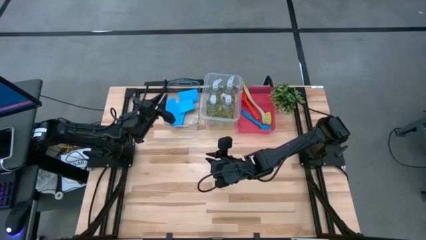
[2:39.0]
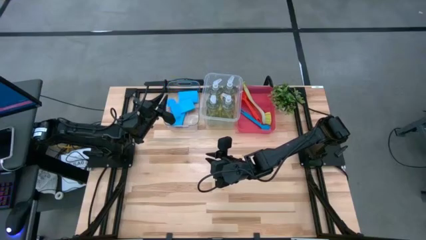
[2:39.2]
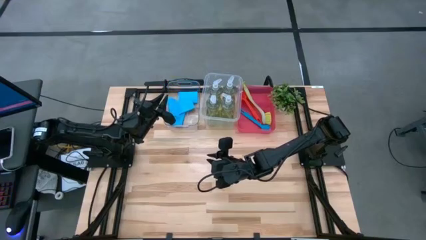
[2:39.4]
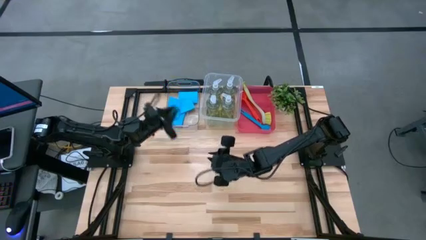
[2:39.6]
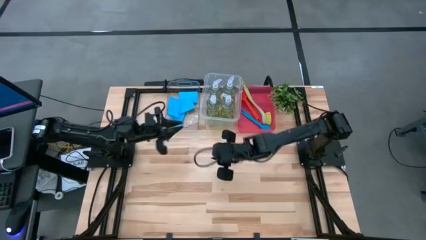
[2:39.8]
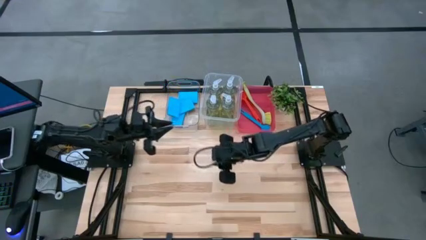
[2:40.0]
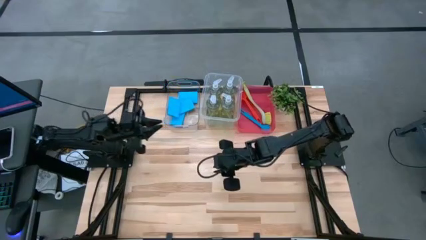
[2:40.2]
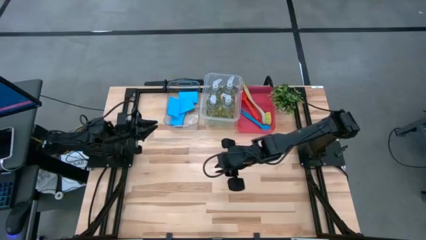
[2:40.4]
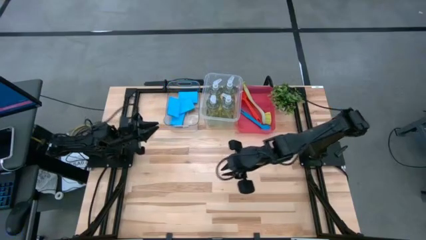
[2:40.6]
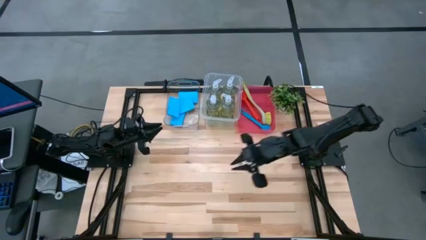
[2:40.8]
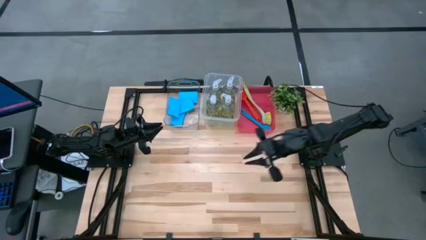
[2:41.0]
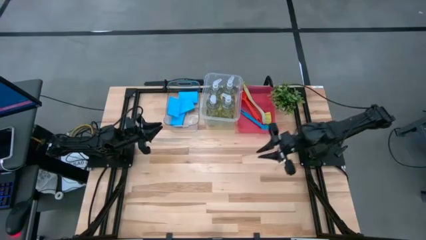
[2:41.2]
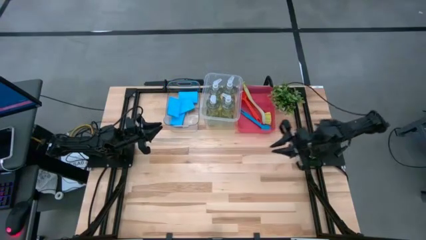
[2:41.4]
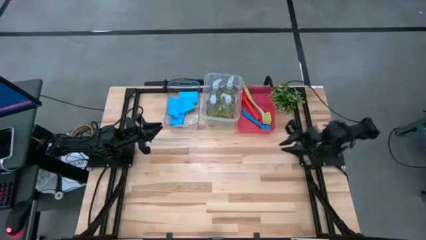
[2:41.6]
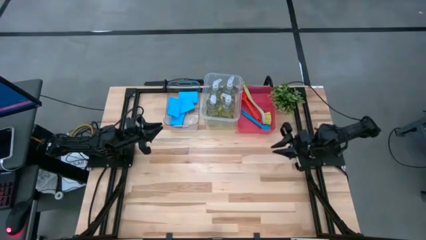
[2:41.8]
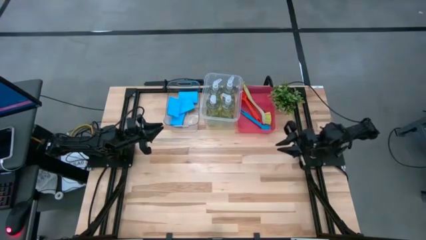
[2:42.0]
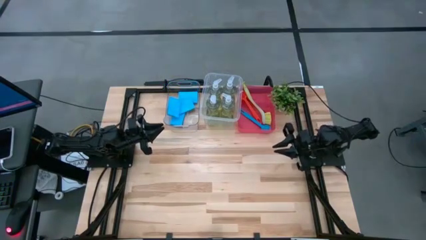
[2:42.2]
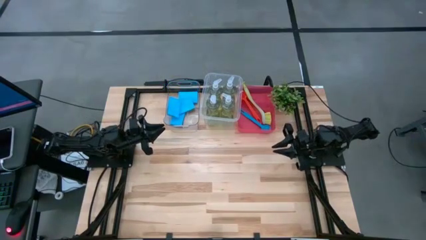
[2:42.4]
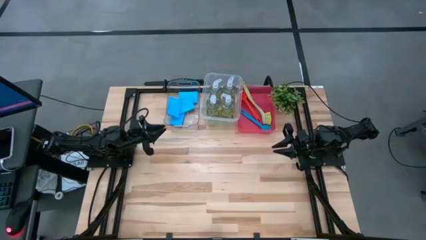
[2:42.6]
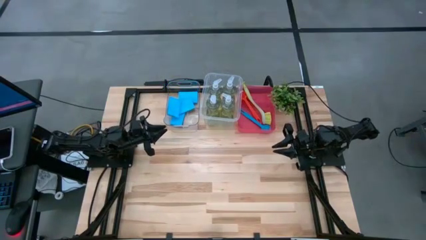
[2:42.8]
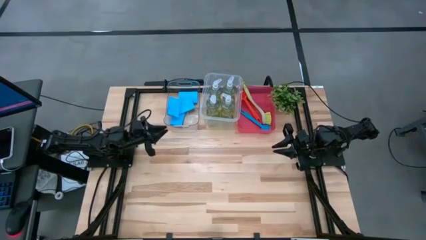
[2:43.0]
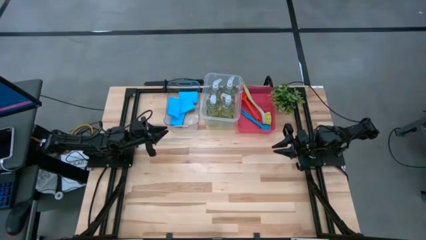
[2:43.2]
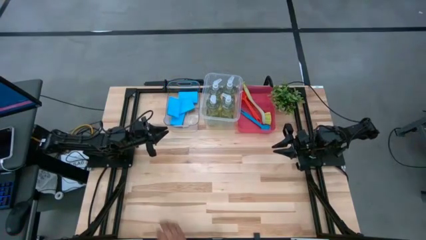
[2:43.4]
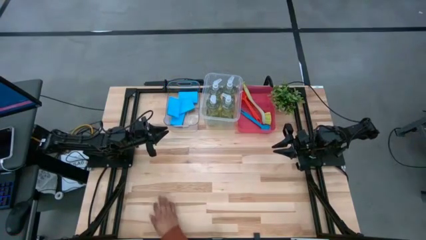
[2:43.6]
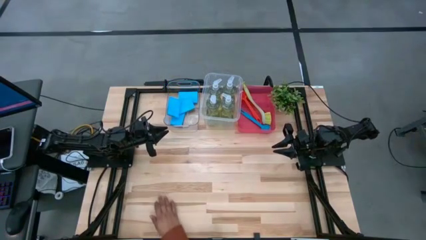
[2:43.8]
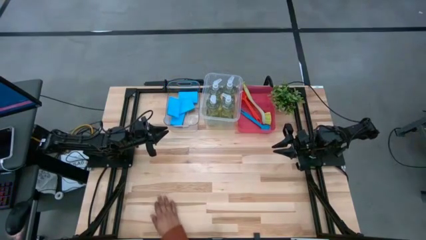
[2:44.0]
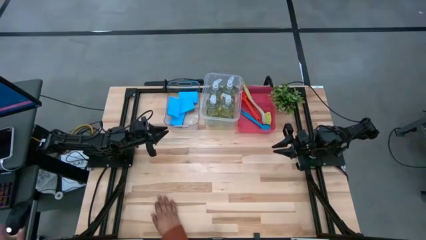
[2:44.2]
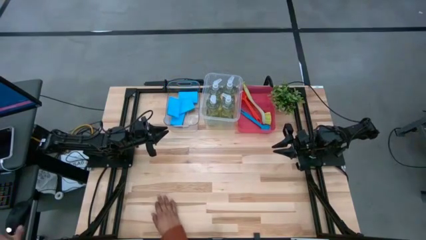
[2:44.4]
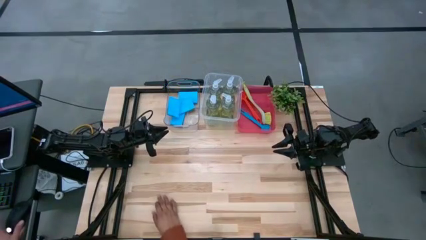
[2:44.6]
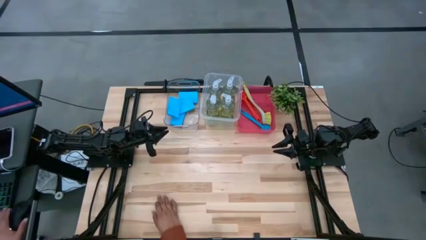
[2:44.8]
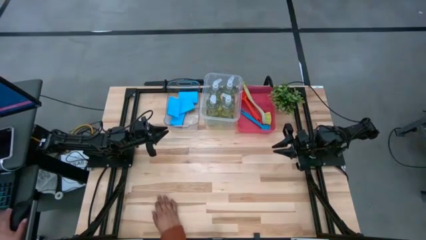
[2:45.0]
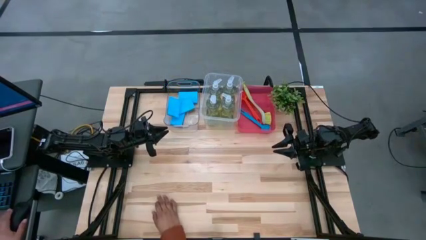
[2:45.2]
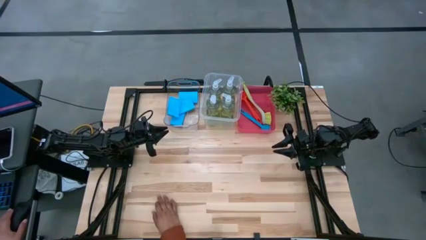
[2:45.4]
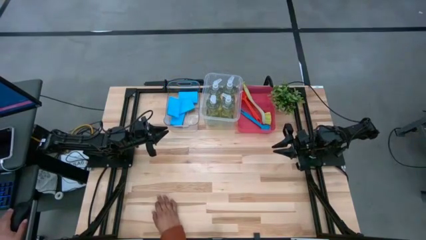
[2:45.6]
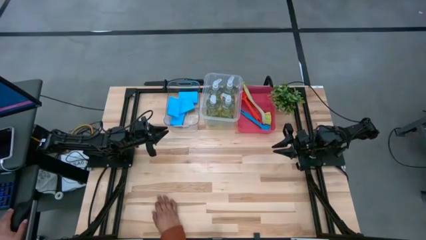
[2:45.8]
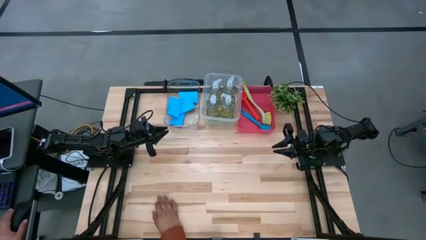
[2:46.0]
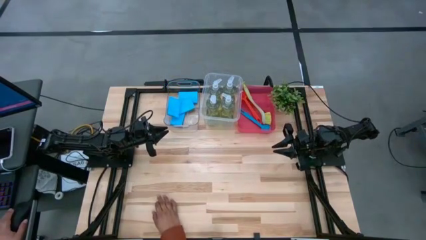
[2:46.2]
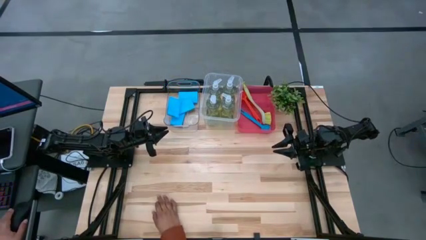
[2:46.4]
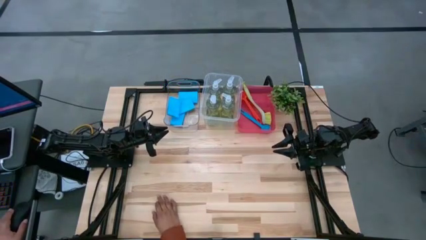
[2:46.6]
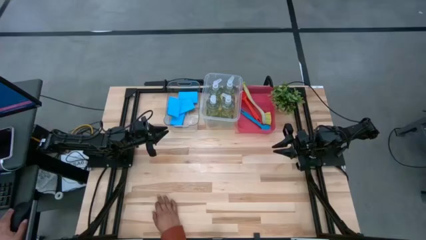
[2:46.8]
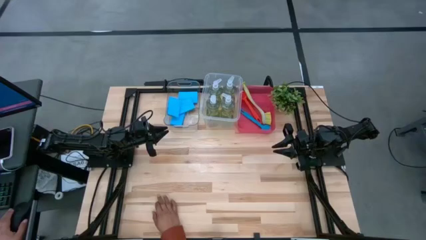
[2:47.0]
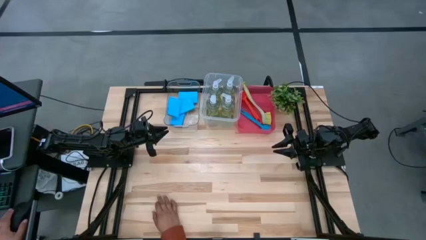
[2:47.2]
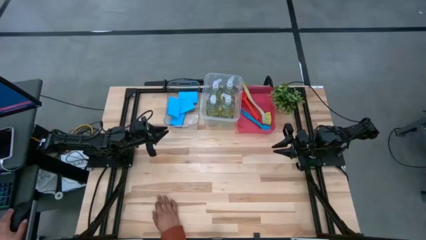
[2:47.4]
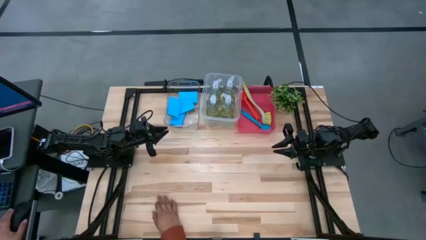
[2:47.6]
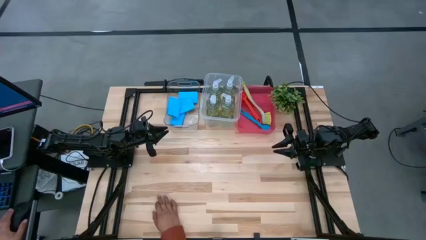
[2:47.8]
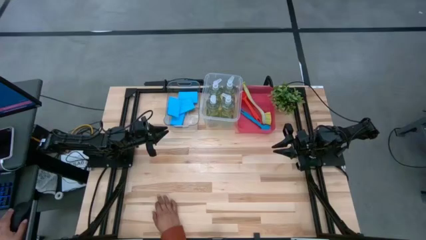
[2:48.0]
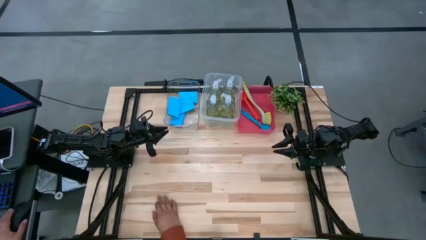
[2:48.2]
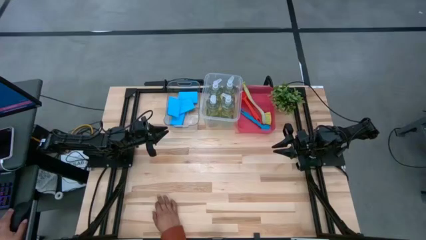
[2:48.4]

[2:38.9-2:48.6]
Task: Pick & Place Kitchen Sink Supplies
Return to Home Position

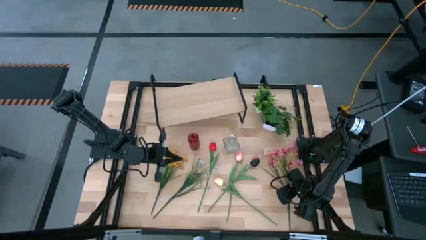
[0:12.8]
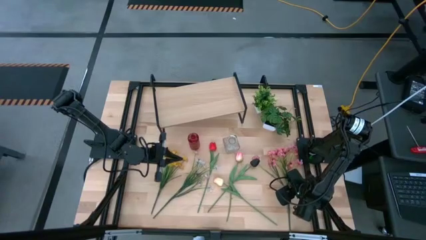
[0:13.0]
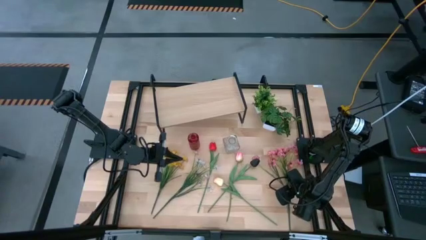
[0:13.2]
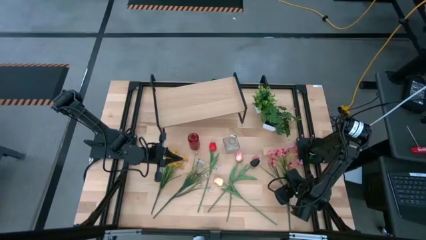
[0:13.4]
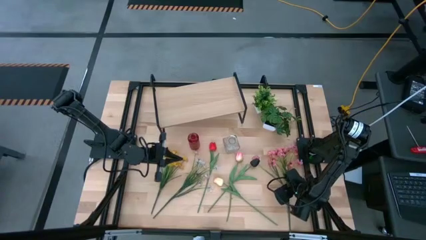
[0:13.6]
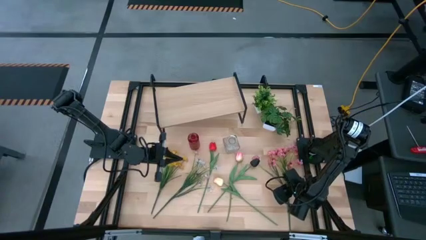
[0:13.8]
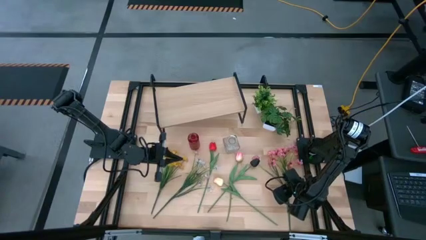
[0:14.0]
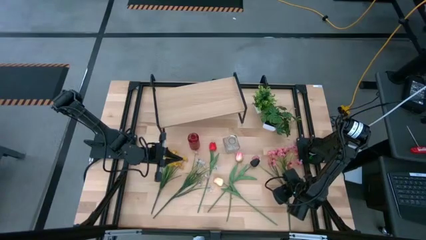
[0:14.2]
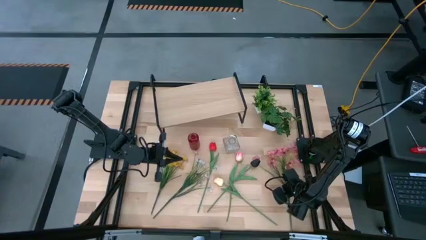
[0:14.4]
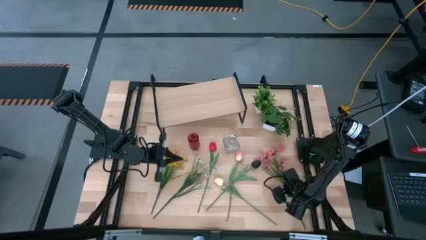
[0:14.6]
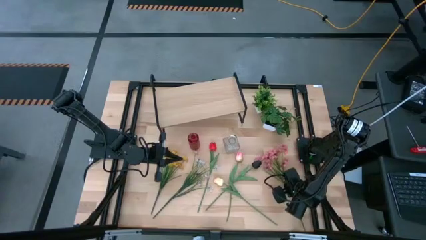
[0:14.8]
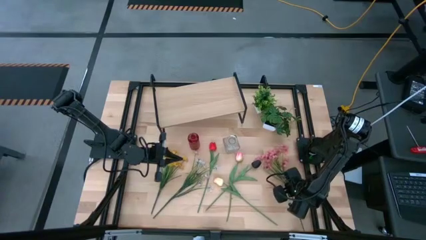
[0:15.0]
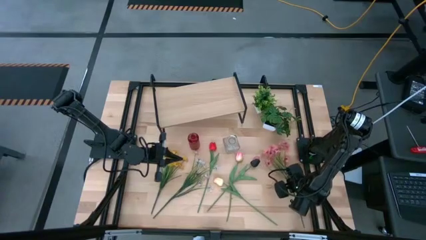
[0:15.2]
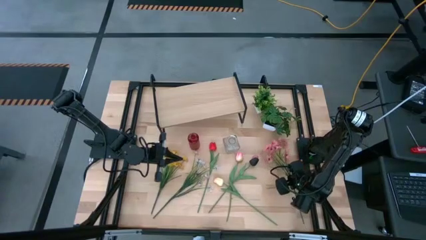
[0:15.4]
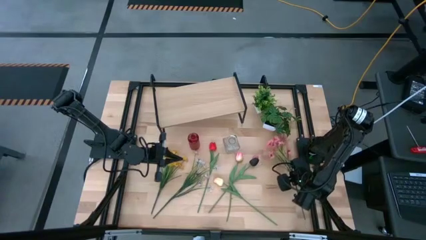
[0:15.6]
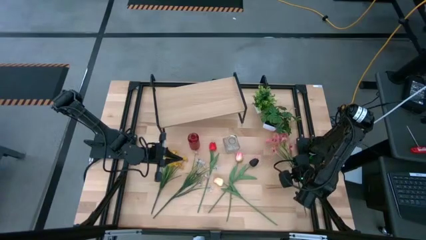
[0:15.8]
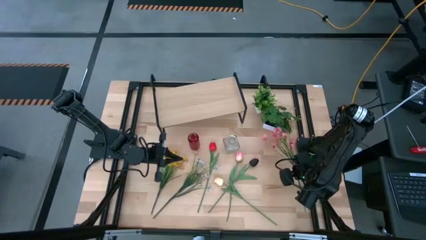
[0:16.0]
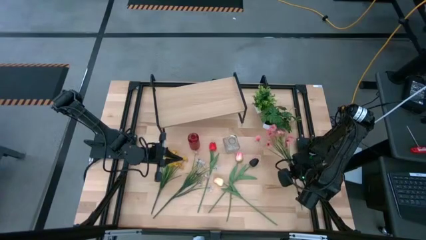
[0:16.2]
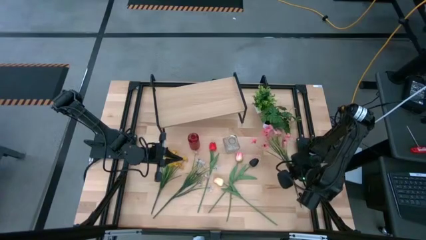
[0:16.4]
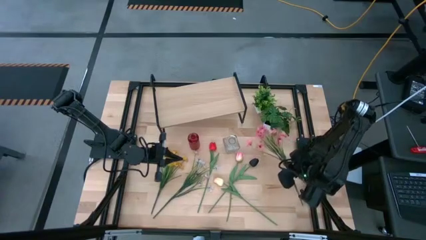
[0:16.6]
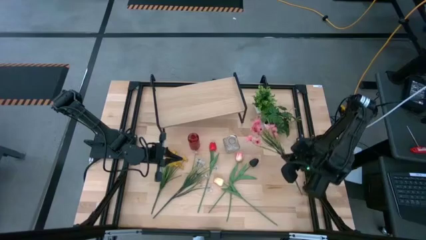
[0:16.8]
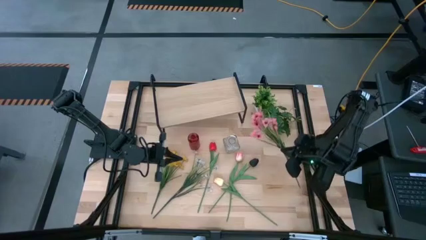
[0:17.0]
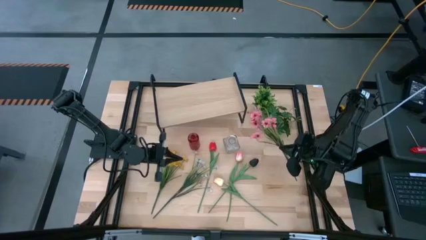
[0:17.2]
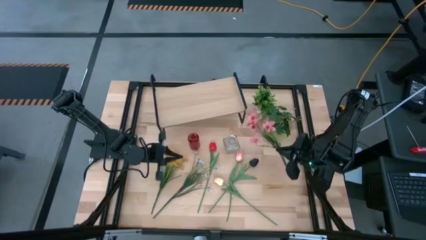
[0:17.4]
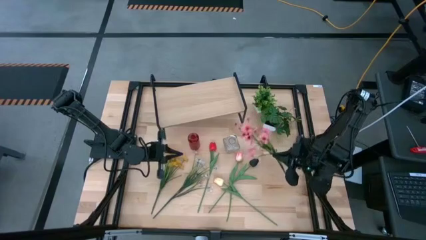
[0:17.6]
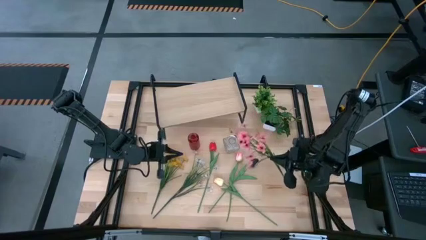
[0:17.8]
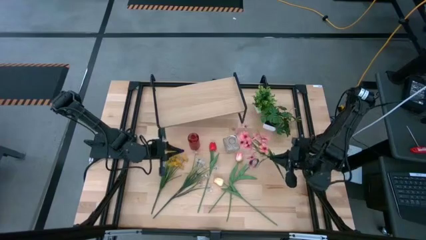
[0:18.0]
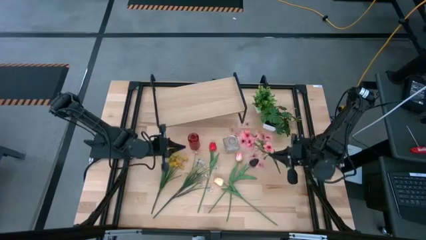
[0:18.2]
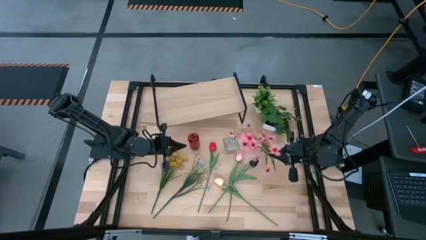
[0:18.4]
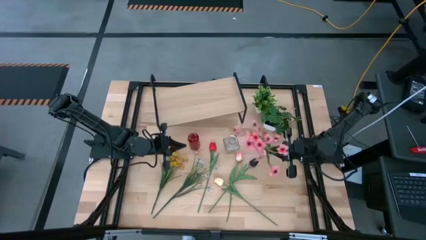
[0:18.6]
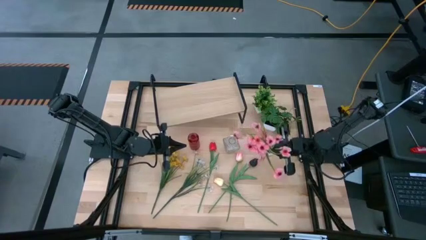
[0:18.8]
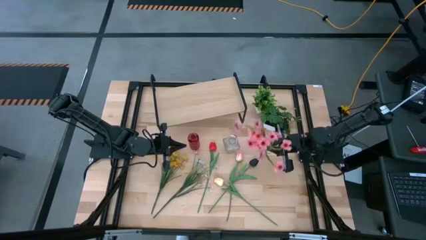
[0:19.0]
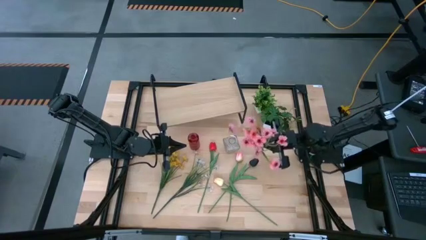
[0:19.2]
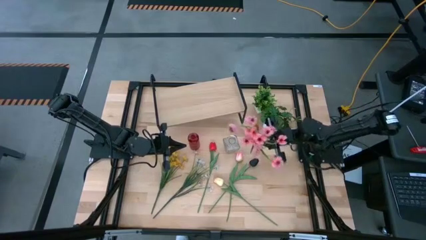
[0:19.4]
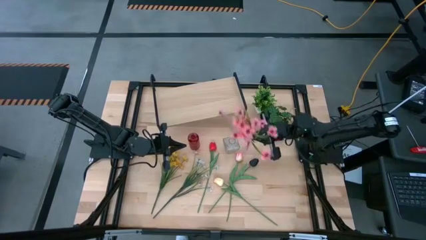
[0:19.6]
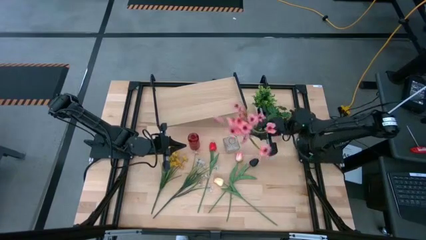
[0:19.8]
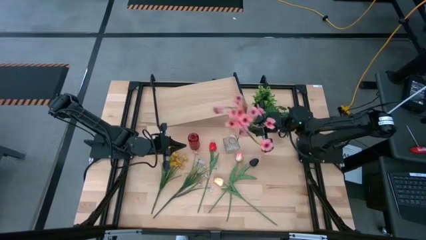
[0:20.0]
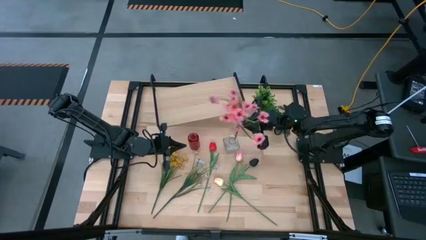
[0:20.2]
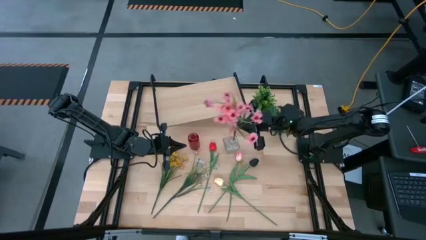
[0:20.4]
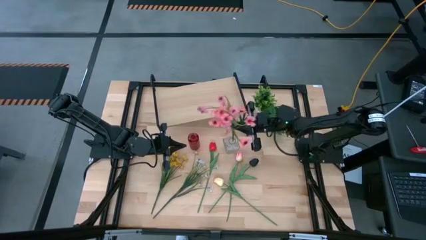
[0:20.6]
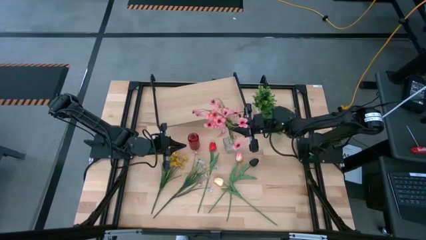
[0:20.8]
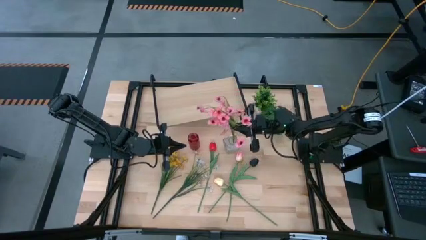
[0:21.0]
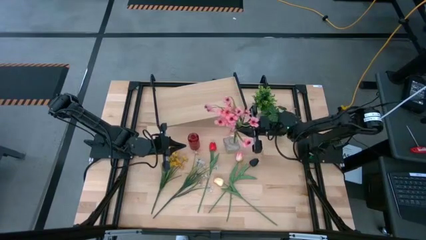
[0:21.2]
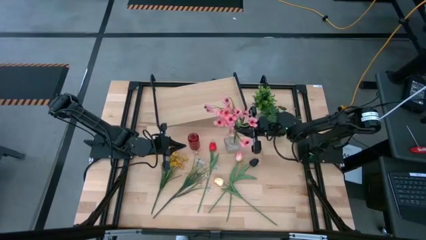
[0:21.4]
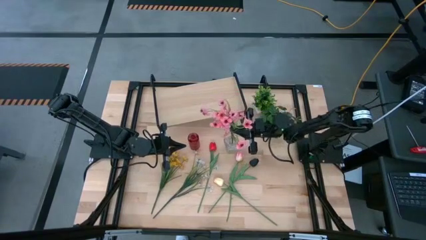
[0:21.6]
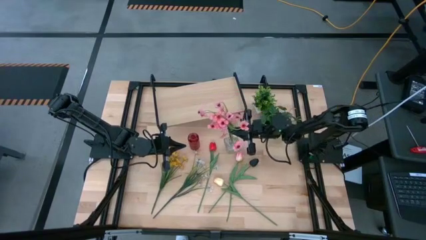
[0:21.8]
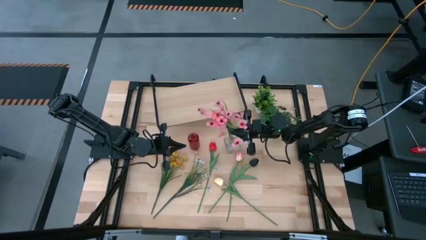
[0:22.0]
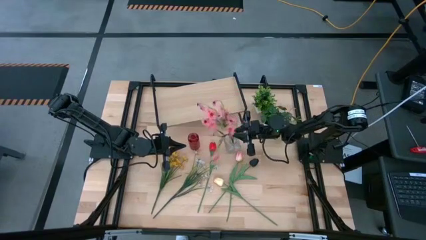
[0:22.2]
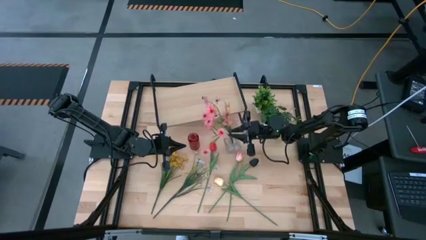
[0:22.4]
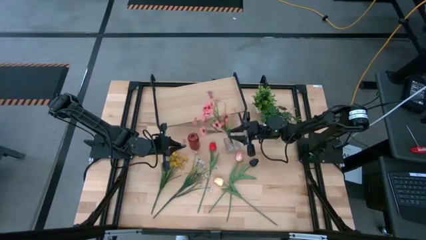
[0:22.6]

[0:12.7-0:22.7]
Task: Pick and place flowers into a vace then onto a shelf
Put the pink flowers into the transparent vase
